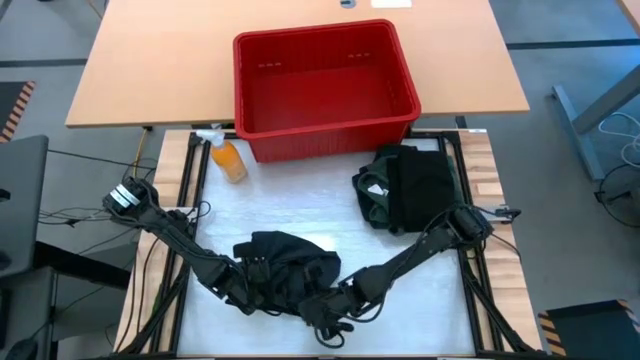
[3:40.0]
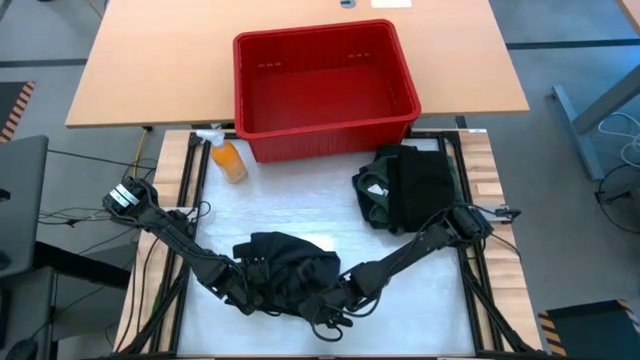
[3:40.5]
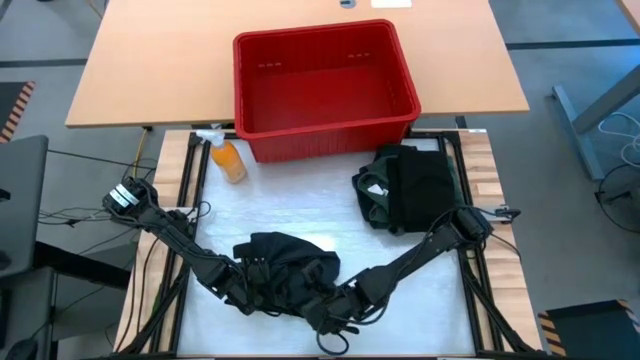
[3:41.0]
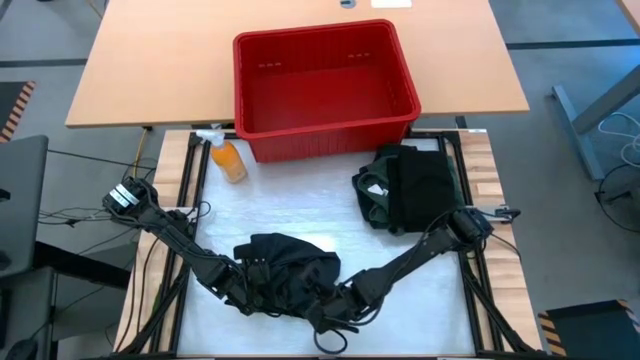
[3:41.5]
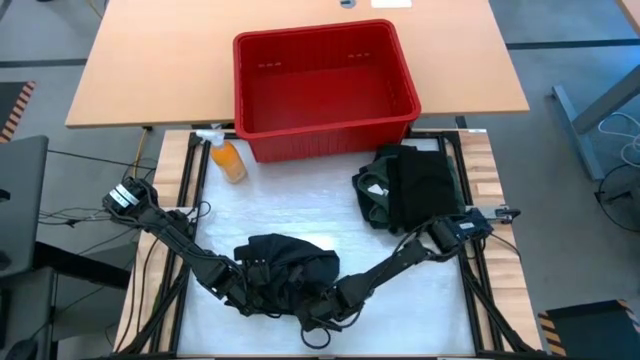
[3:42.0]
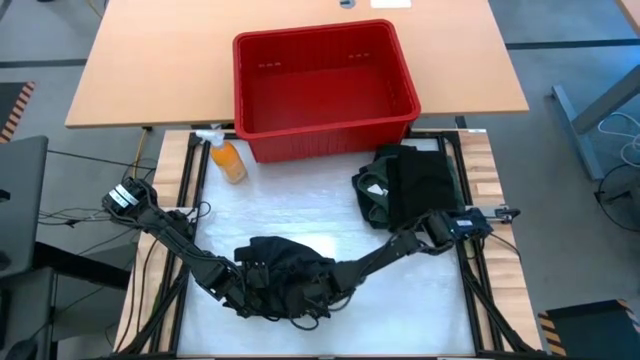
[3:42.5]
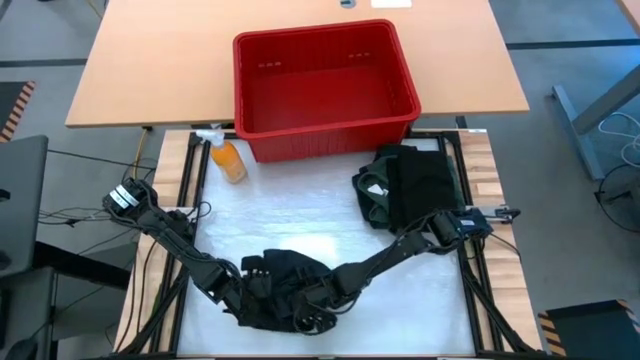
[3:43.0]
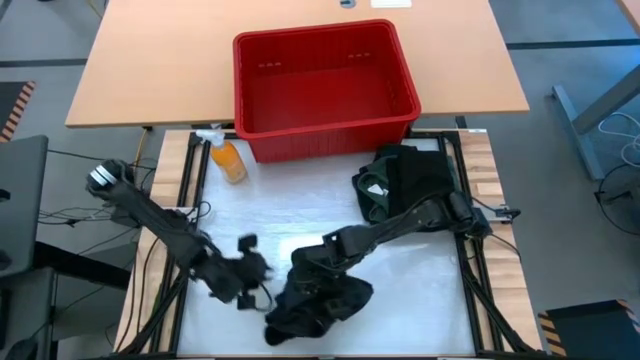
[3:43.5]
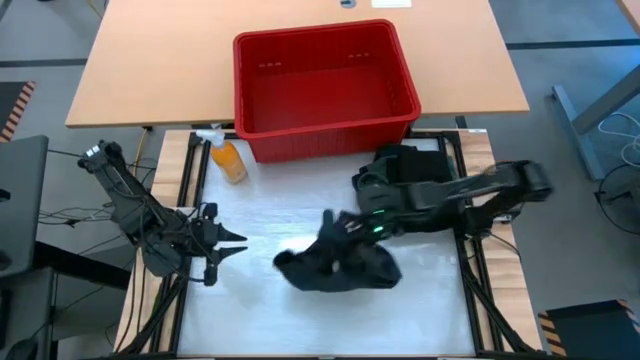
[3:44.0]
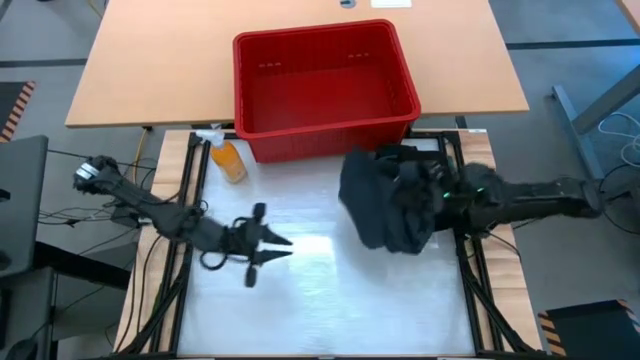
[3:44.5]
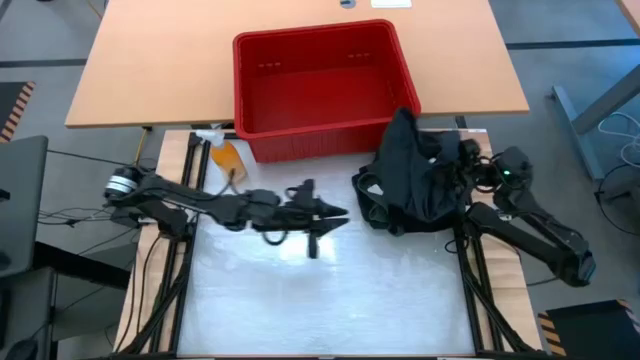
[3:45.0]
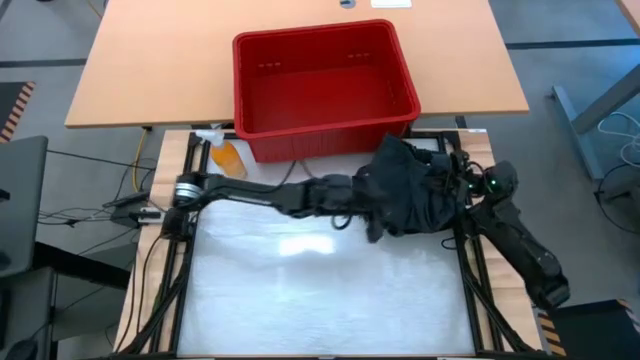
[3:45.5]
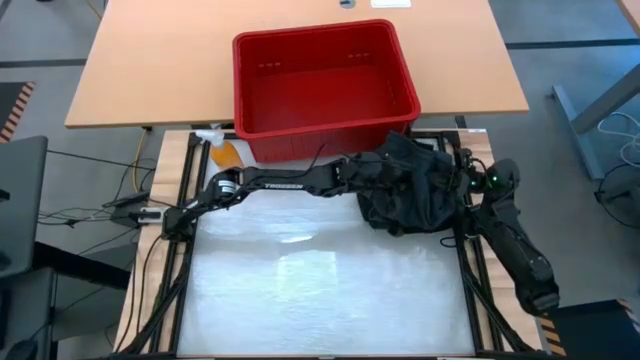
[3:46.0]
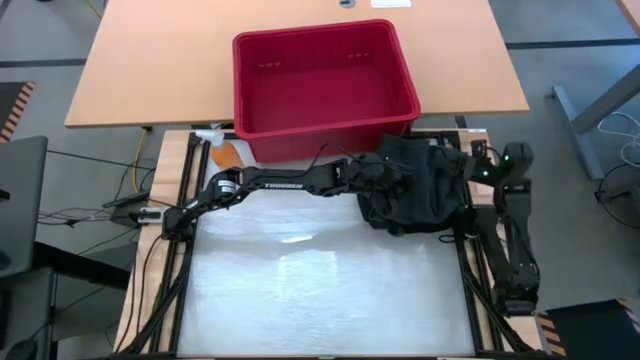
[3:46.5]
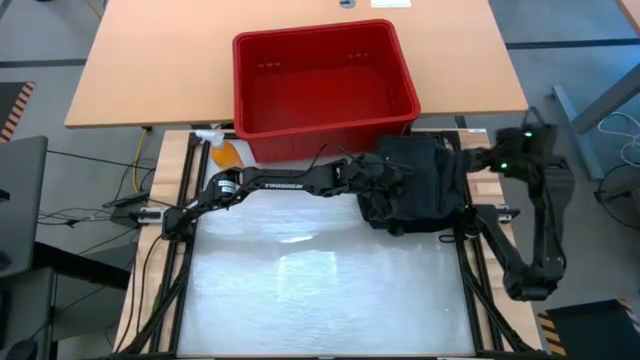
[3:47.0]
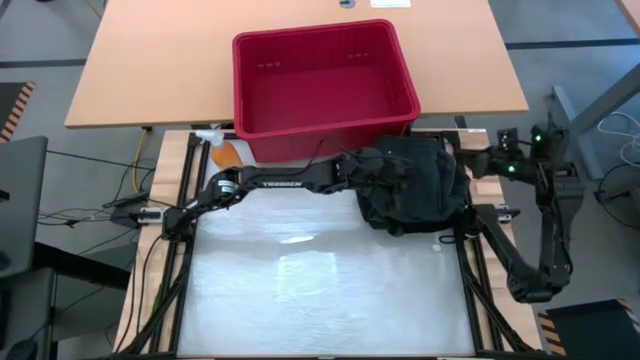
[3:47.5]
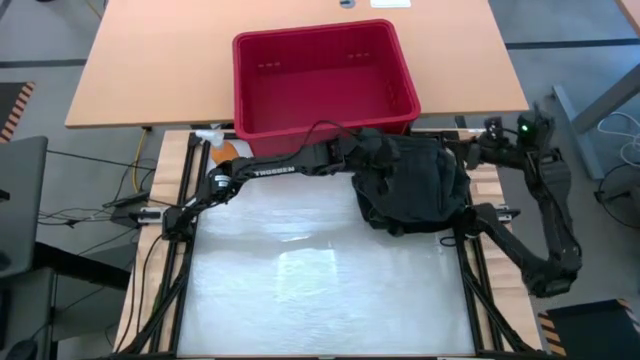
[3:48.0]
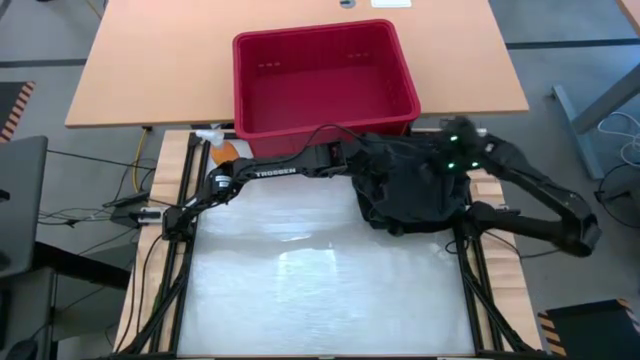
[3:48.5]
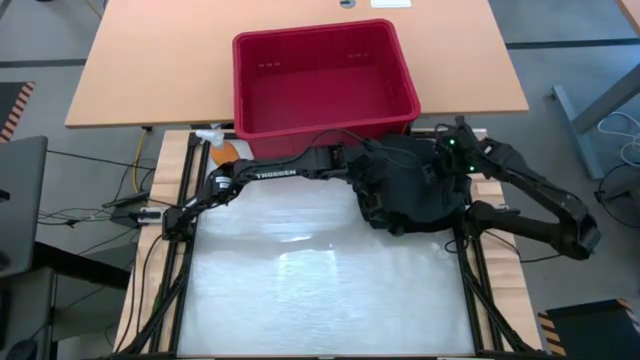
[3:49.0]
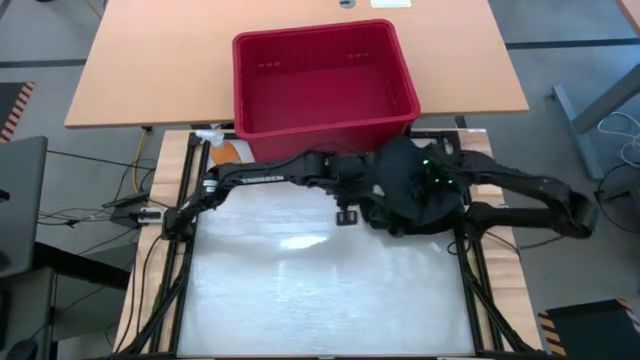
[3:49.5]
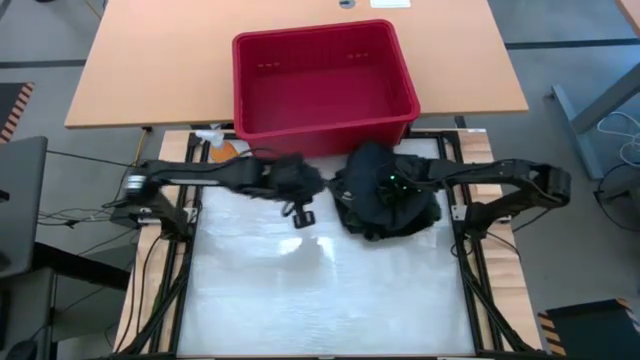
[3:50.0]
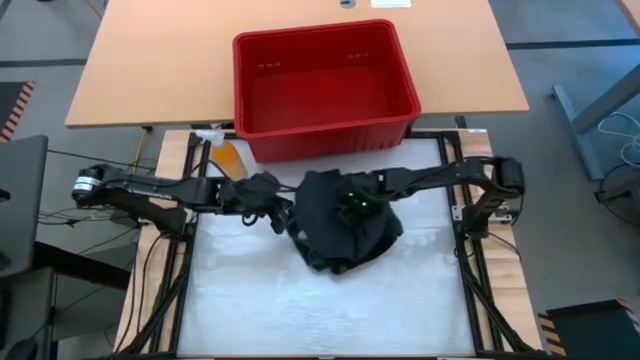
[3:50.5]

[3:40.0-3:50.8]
Task: Fold laundry
Stack the black shorts on top of the black shirt

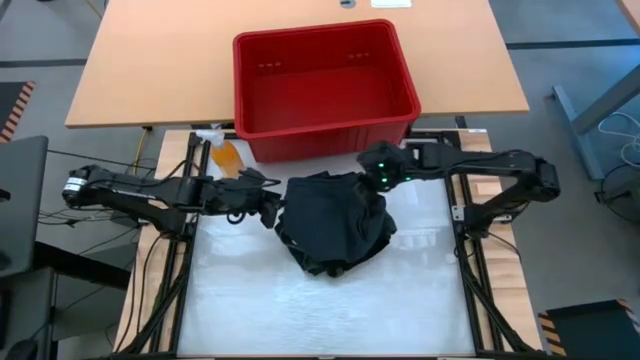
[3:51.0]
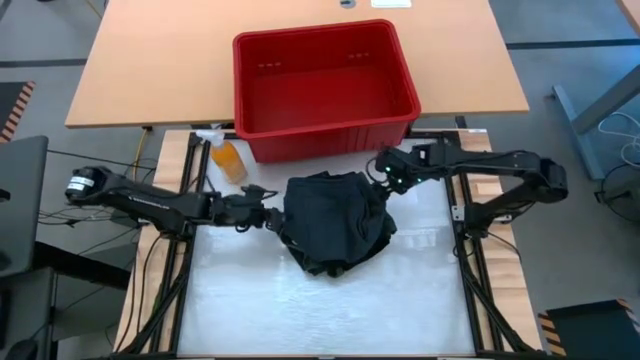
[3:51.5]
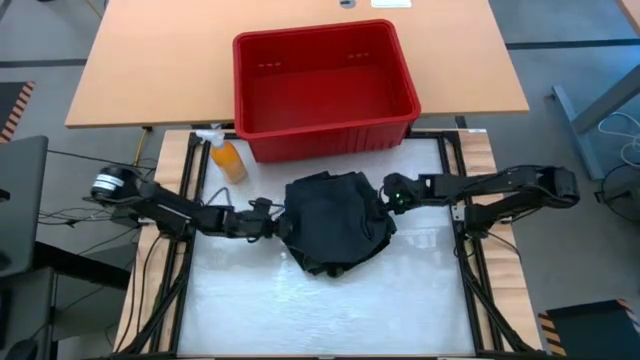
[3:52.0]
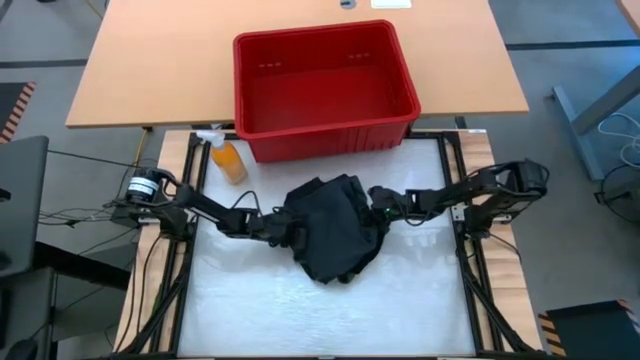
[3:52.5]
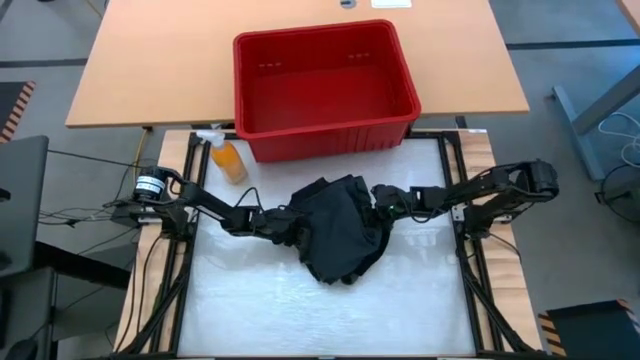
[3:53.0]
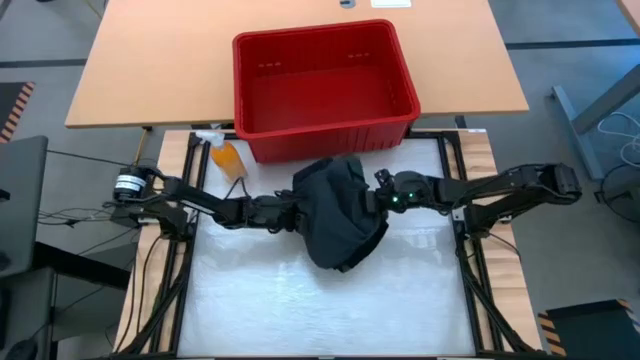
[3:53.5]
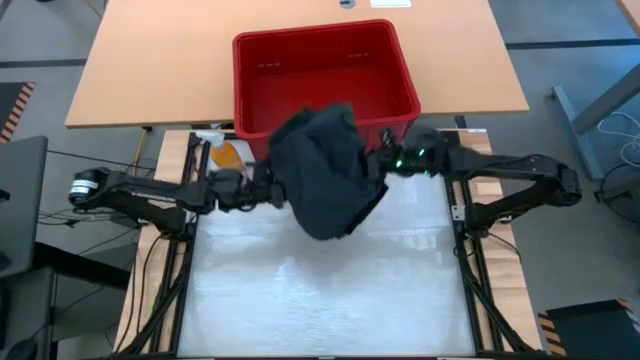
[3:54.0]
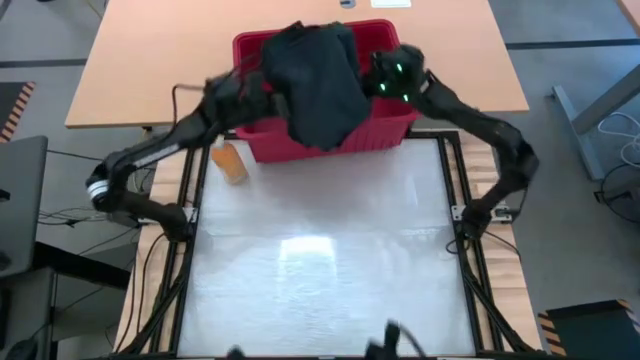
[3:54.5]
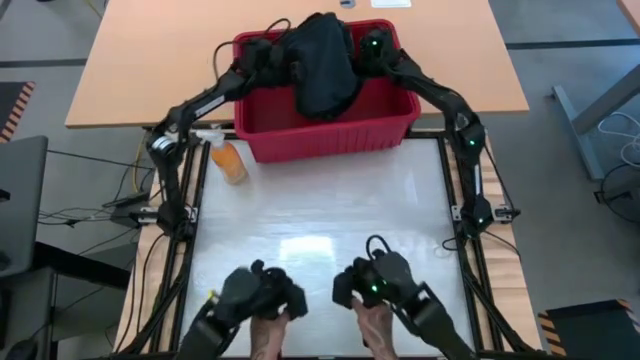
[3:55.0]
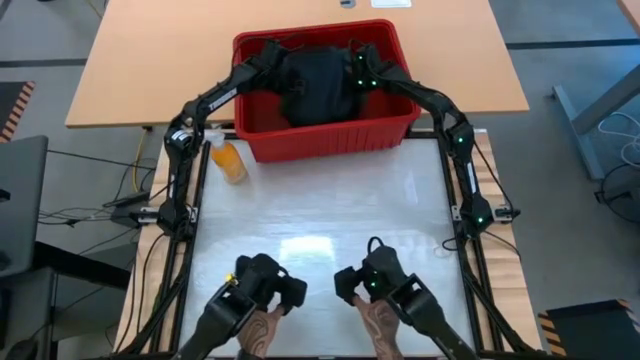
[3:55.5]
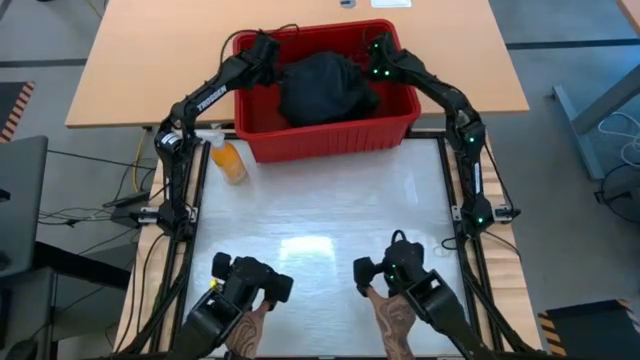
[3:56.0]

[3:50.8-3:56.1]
Put the stacked clothes into the red laundry bin

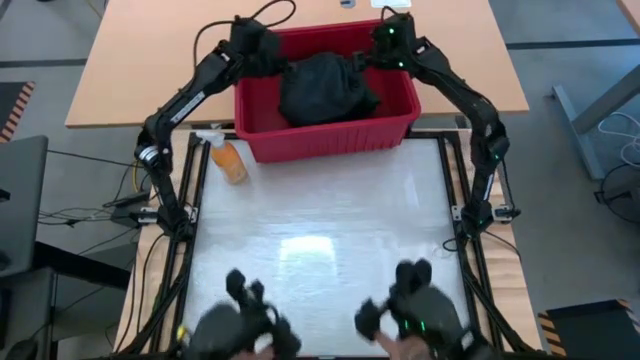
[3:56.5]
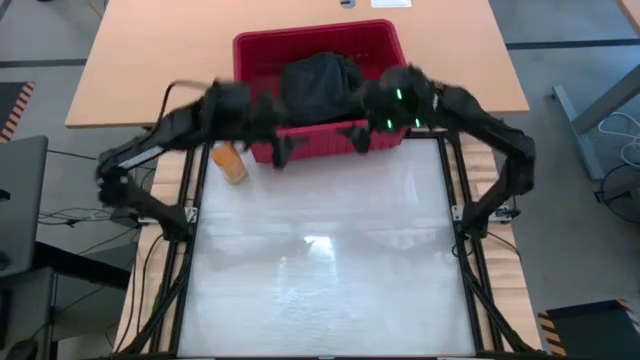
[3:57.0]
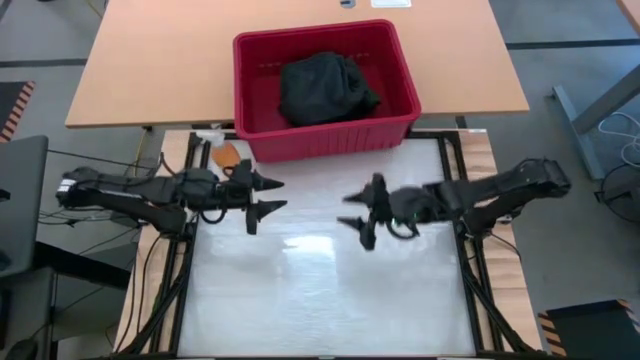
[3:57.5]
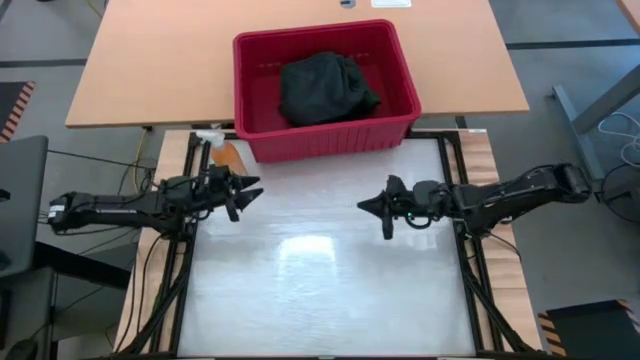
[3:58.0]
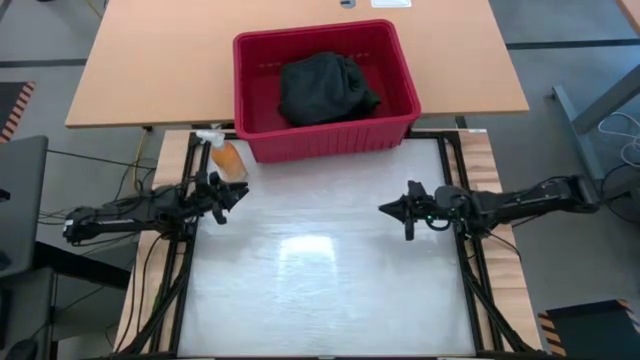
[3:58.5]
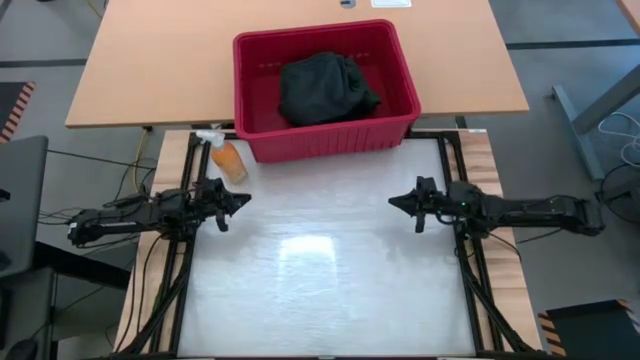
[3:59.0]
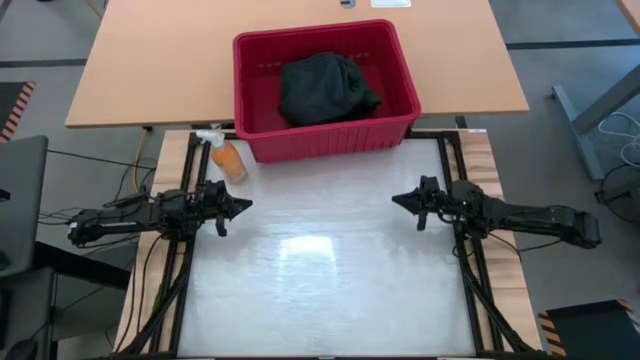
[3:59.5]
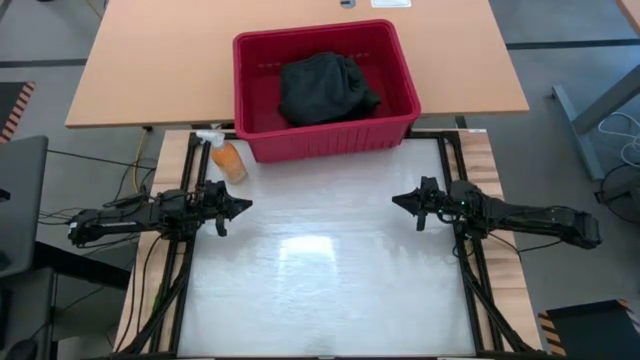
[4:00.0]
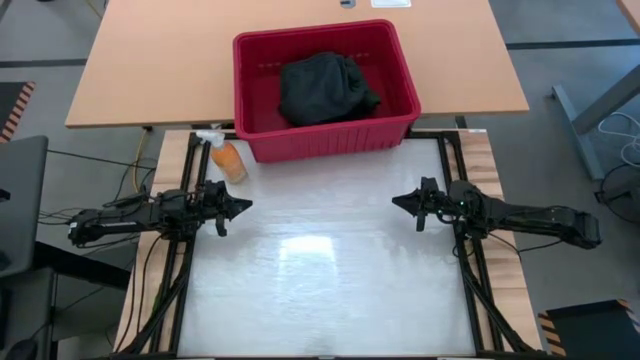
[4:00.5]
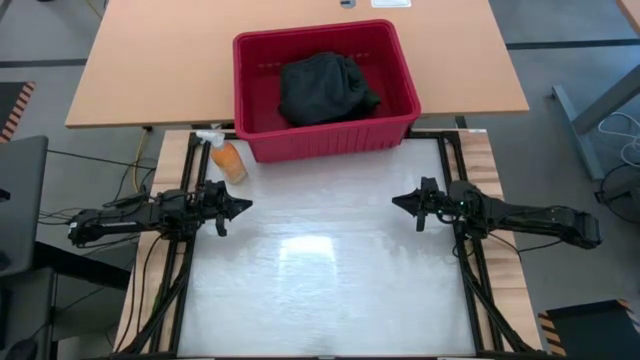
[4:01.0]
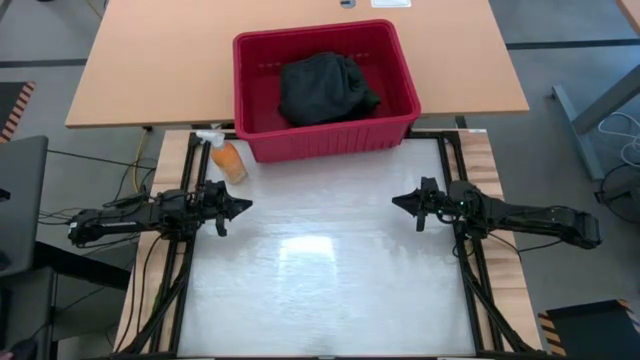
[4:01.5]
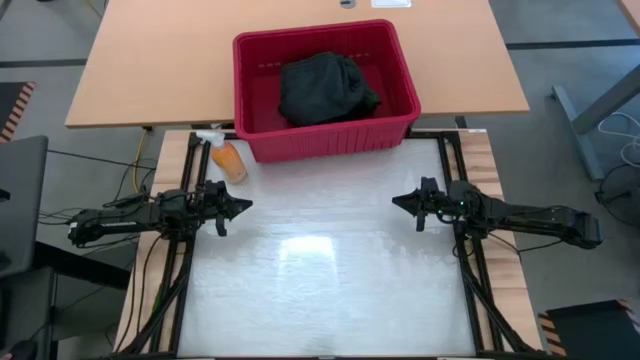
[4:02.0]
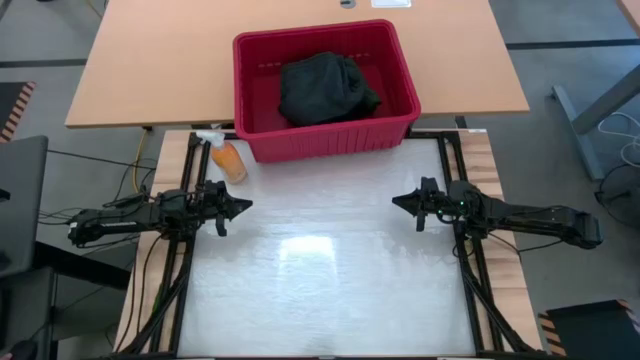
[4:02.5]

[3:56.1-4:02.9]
Return to Home Position
